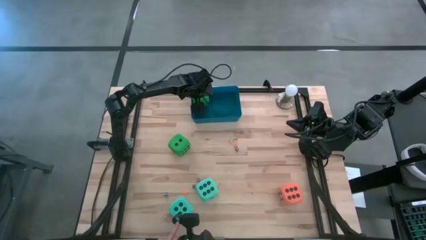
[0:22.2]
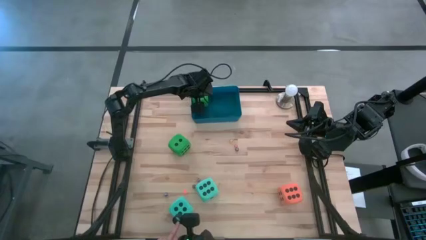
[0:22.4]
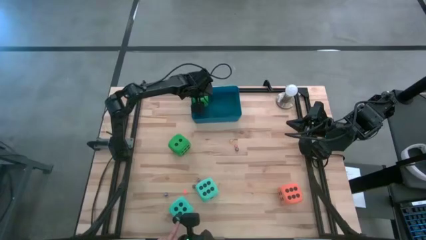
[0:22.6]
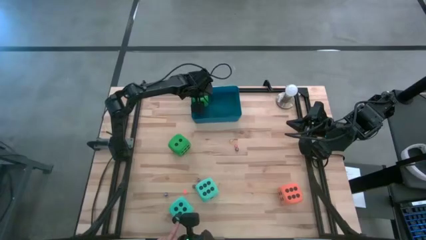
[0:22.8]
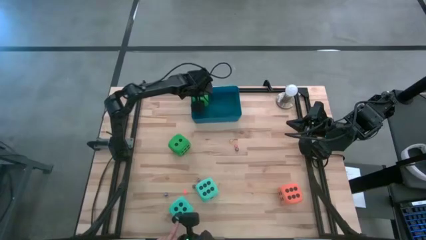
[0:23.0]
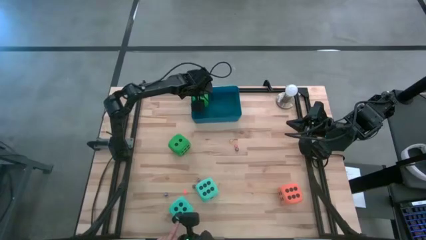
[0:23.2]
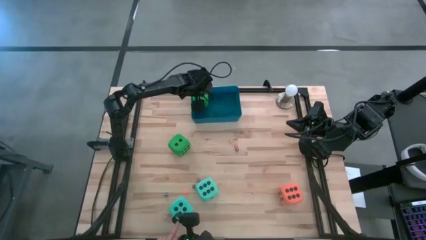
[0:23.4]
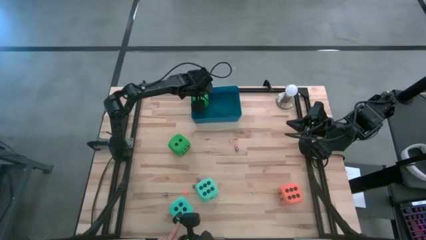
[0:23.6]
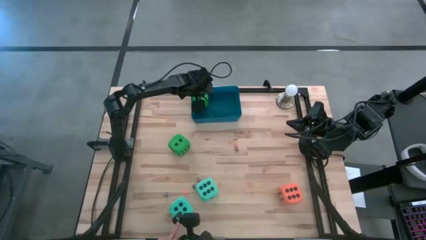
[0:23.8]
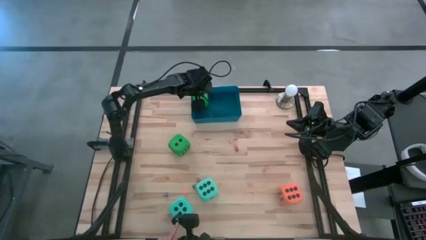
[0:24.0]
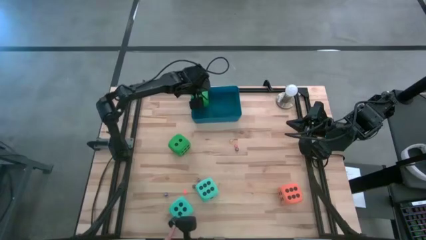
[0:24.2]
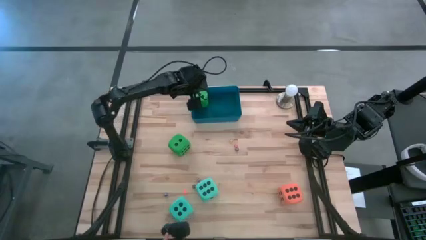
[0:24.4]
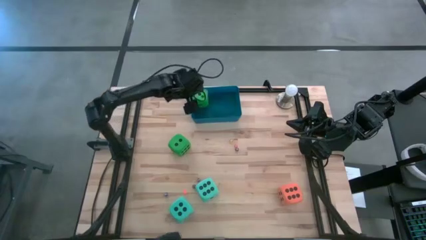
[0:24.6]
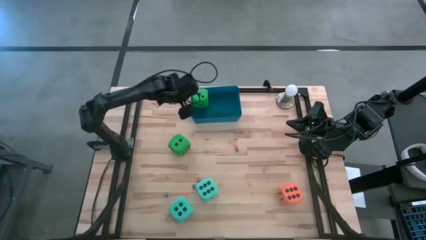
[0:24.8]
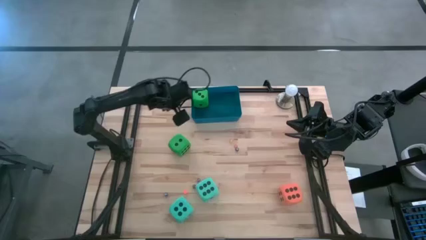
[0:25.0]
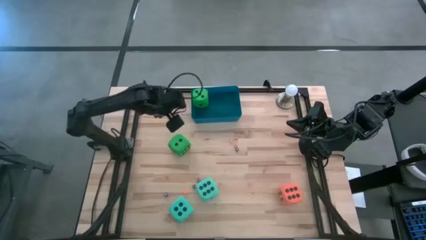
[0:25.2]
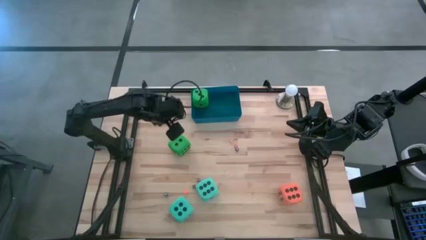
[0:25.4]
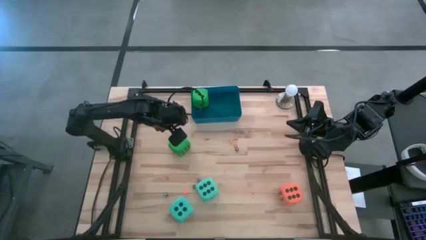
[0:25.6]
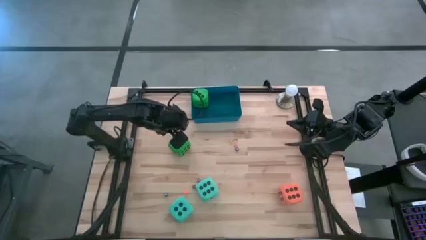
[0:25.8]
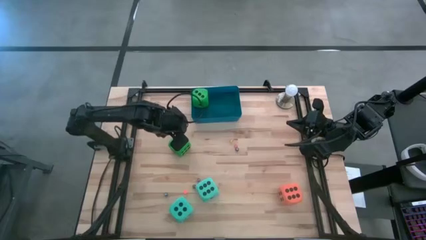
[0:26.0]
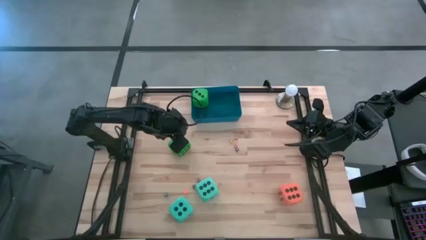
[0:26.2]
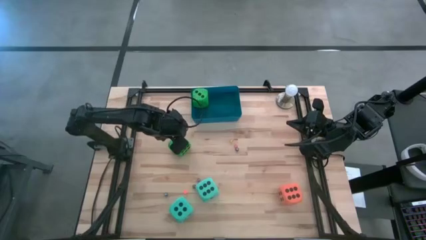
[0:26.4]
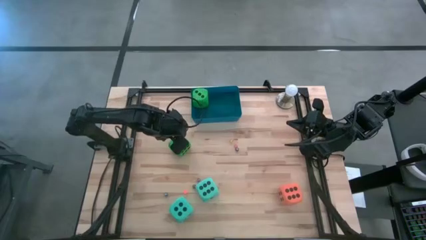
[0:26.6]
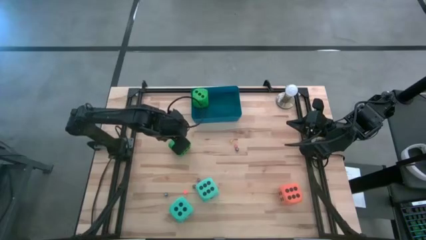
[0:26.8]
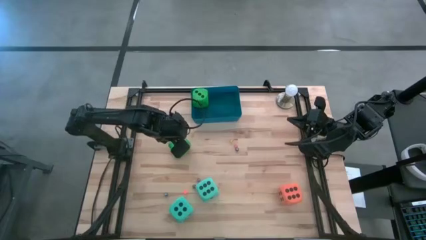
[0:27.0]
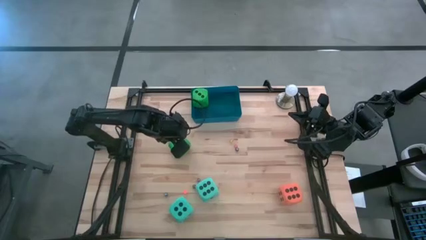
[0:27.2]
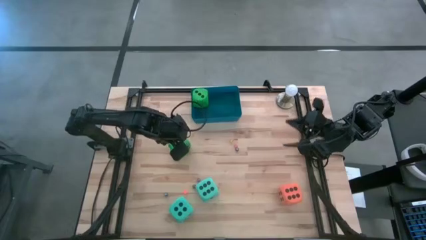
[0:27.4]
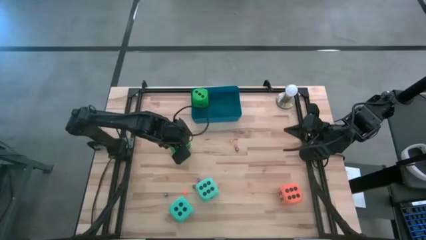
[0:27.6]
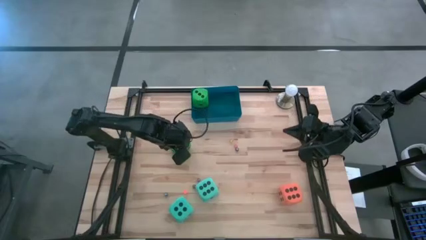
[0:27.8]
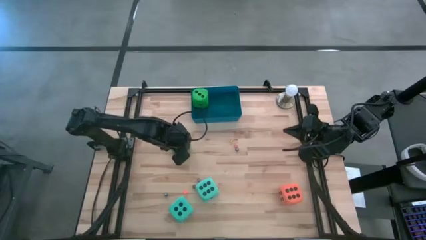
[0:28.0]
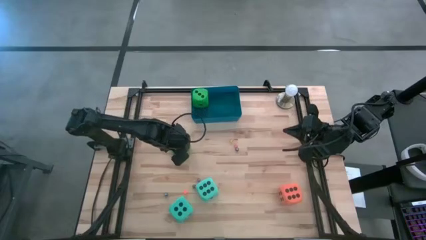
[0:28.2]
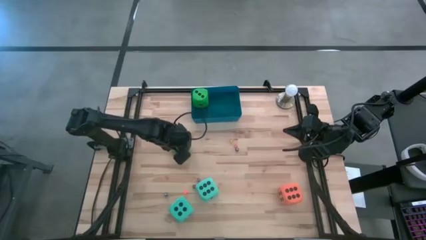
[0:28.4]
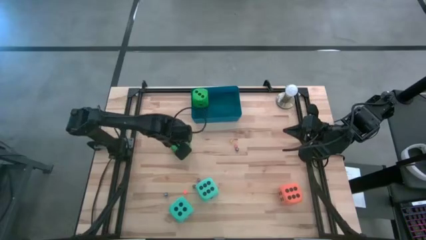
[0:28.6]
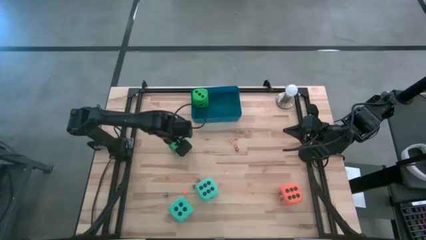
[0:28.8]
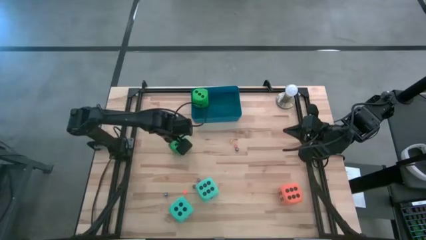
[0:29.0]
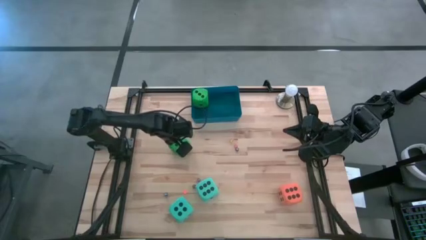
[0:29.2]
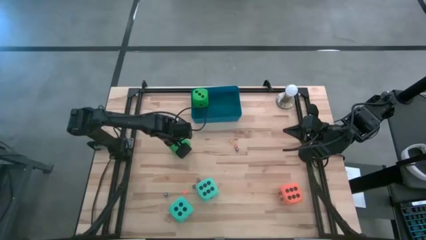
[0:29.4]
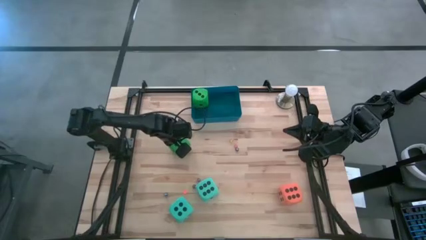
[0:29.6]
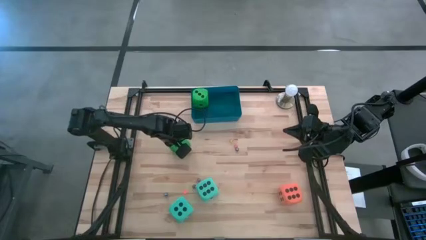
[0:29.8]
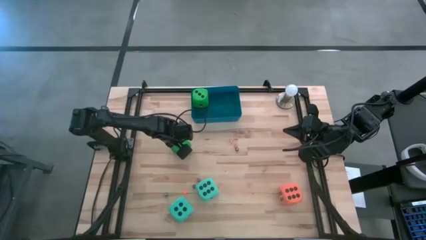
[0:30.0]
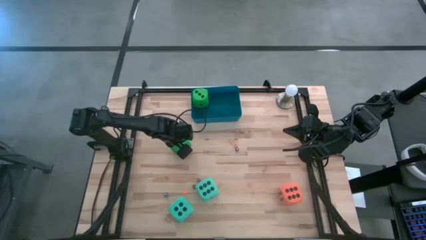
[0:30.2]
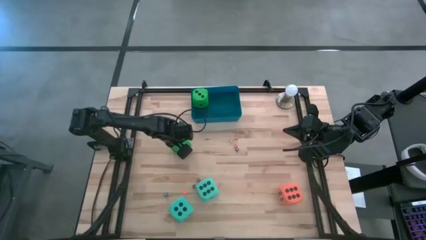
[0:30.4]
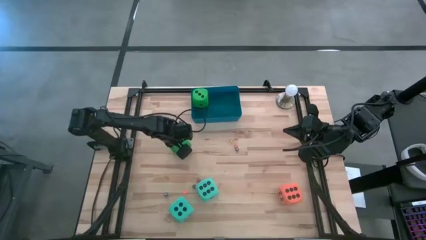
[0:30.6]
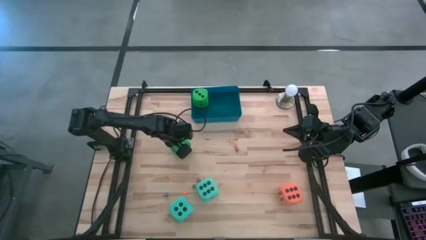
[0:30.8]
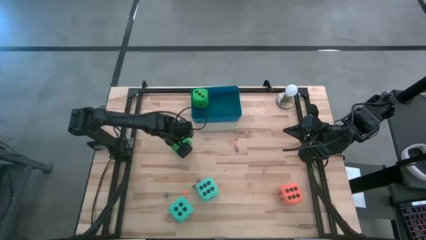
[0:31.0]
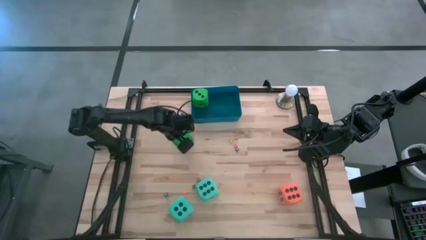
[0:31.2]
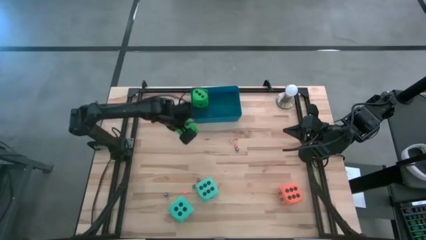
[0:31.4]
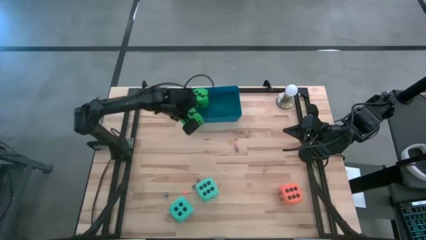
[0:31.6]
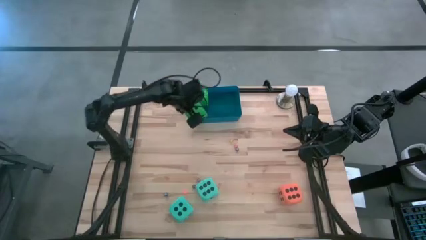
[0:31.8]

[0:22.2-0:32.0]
Task: Pick & Place Dice
Put the large green dice into the blue bin
